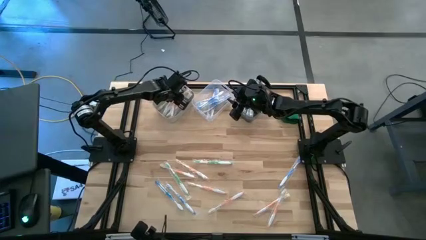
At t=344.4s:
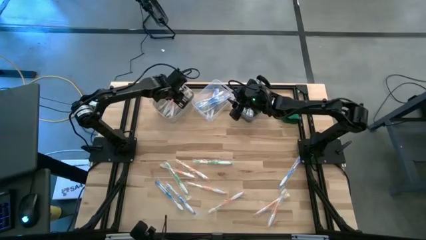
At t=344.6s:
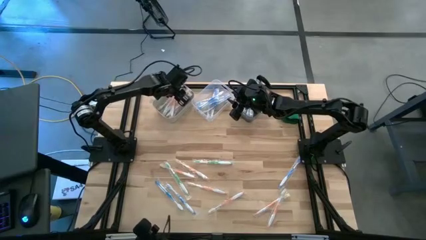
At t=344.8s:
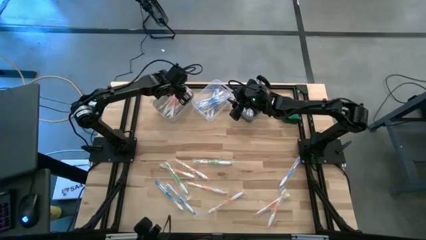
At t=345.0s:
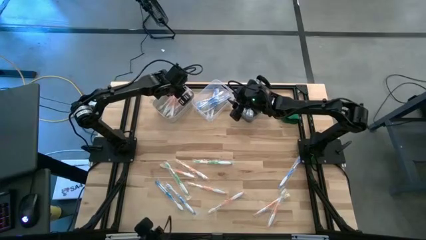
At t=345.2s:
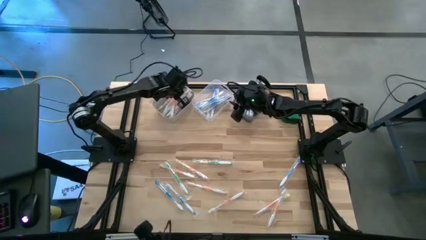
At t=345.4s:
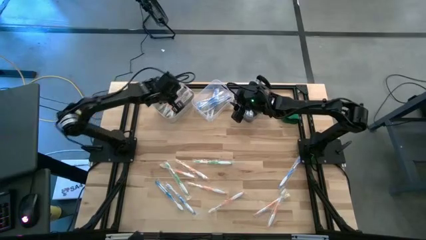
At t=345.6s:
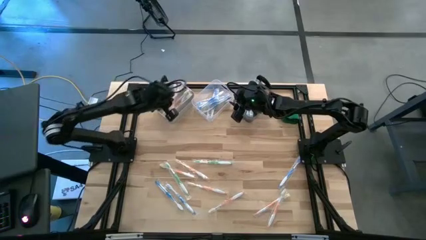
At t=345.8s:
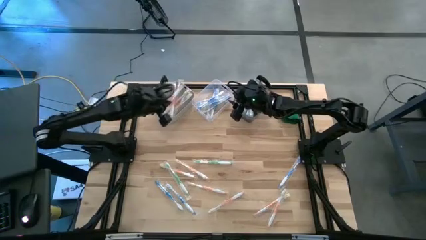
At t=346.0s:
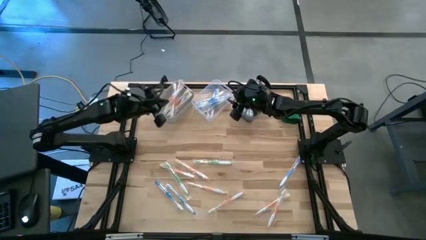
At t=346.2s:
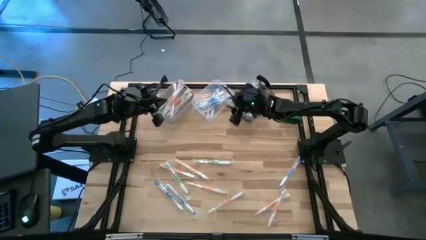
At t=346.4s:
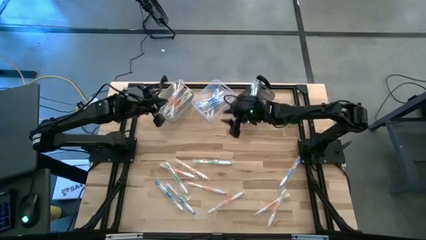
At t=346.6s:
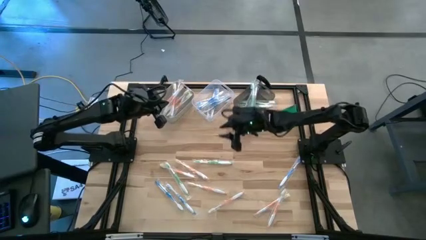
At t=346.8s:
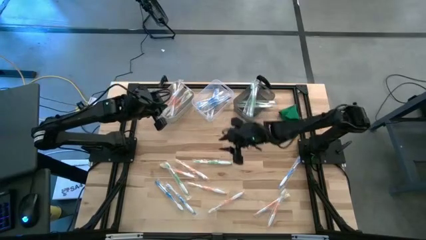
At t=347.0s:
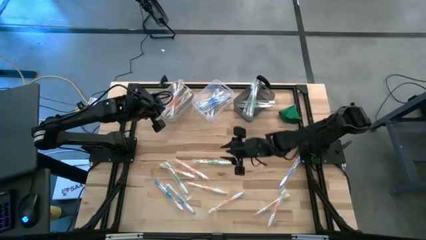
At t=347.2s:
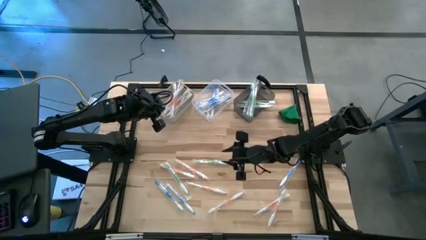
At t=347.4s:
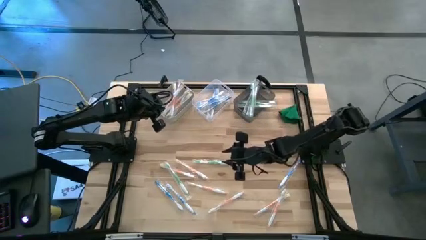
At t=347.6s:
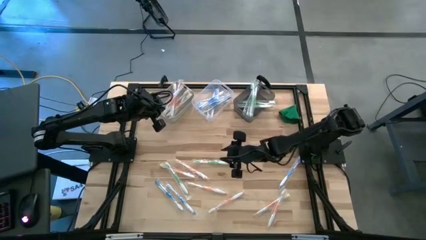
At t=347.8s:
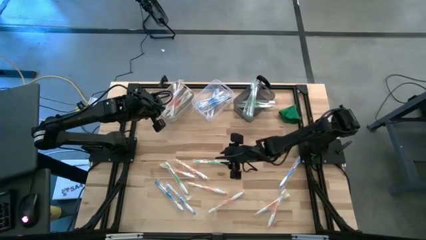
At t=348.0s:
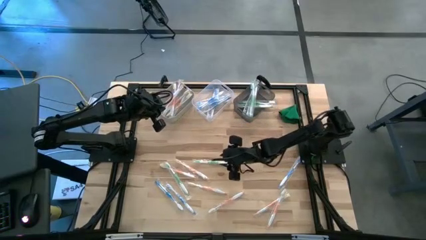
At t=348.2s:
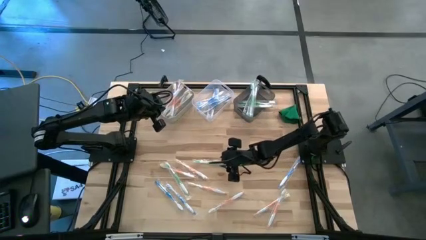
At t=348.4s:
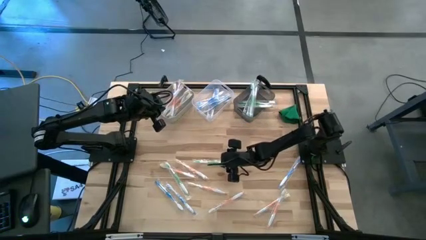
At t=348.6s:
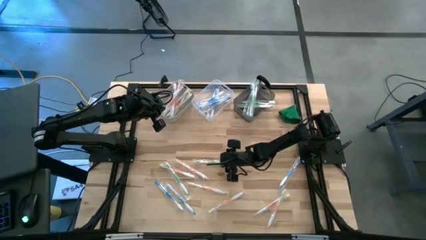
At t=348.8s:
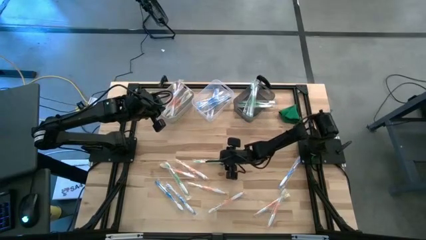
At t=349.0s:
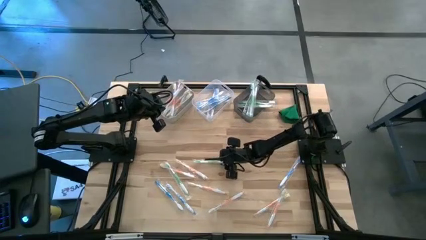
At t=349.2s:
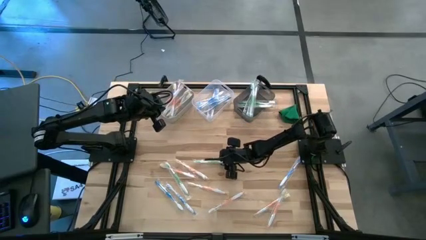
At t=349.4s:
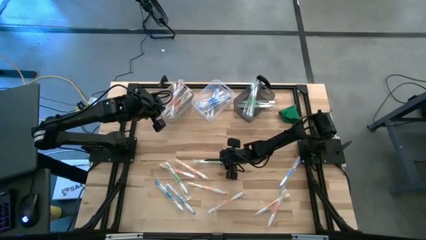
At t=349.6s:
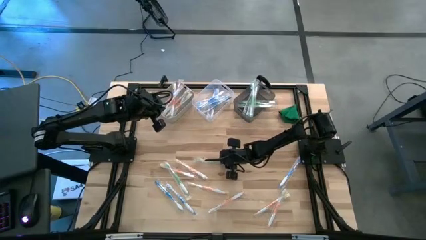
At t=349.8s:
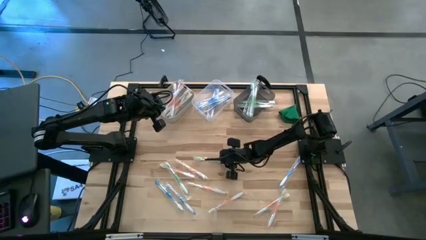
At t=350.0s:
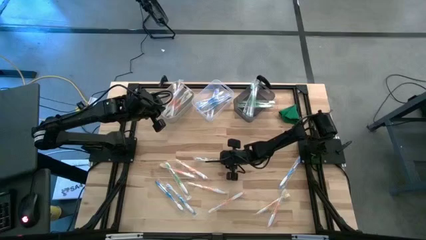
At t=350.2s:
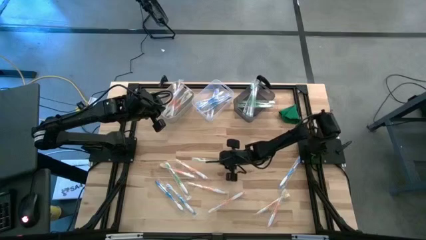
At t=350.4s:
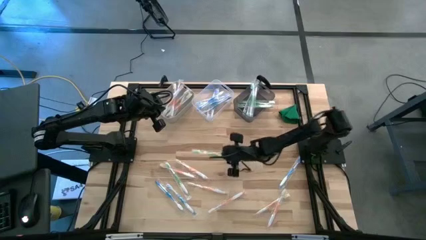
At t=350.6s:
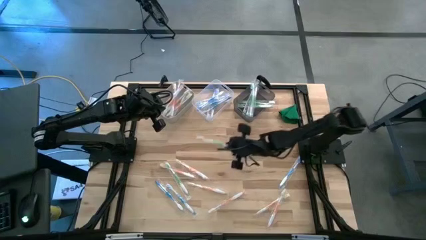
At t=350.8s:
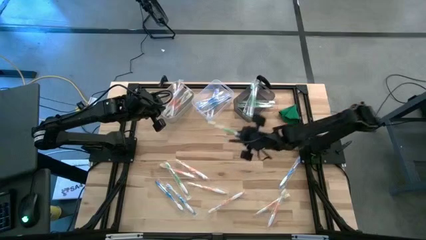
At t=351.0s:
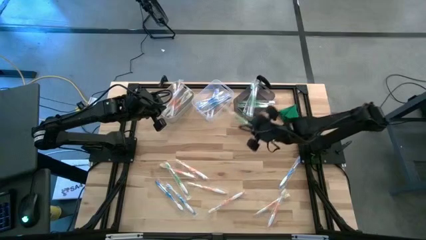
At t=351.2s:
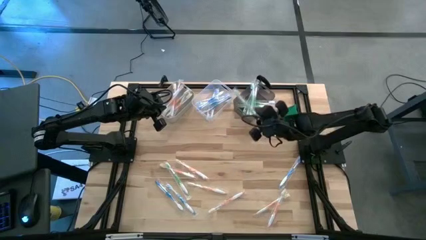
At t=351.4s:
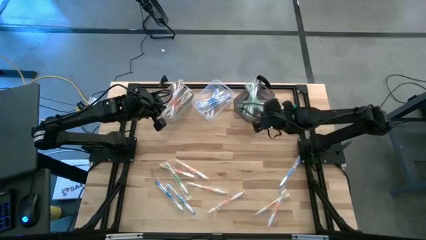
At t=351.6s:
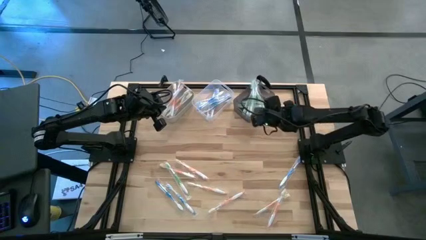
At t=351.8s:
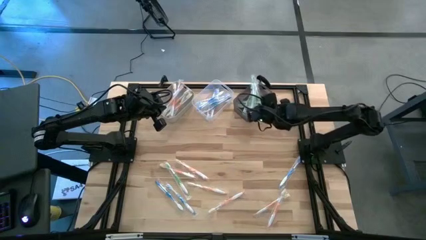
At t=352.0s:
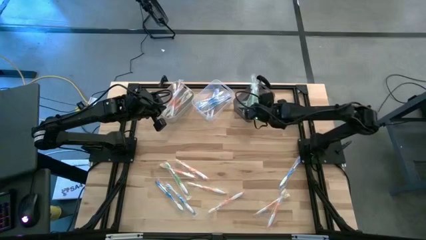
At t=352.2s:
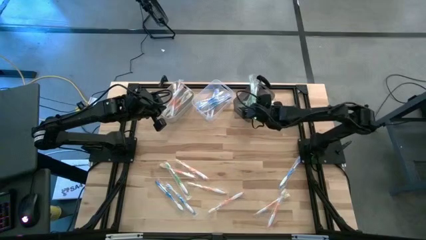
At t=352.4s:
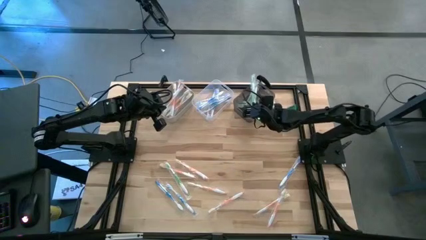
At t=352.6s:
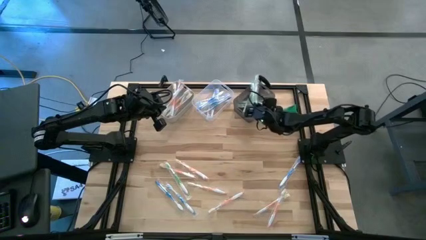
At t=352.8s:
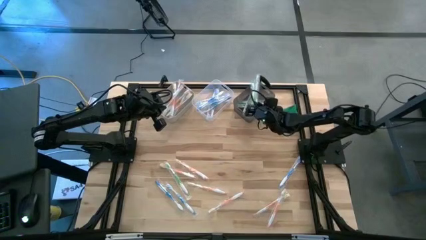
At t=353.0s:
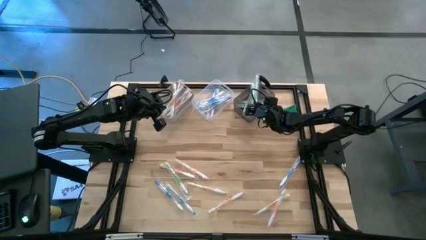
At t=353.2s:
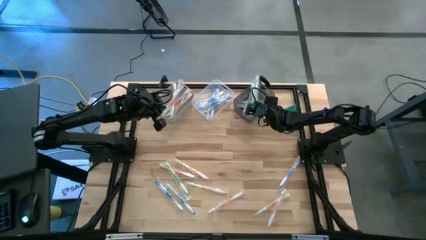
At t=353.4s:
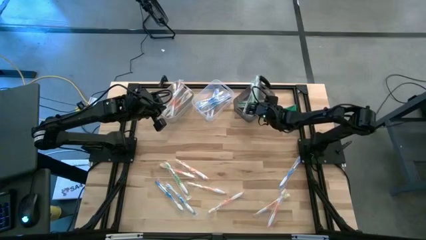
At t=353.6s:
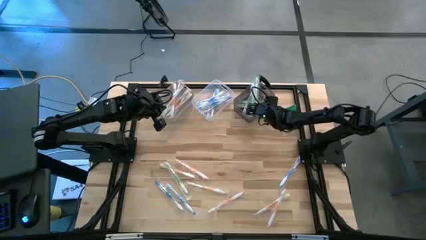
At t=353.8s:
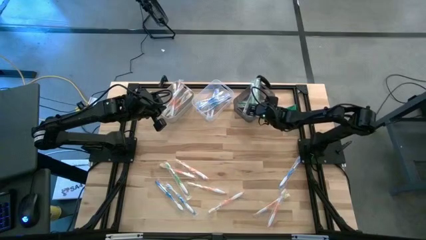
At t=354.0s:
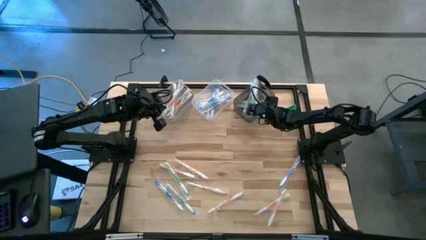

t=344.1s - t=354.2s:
Task: Pick & Place Toothbrushes
Put the green toothbrush into the black bin

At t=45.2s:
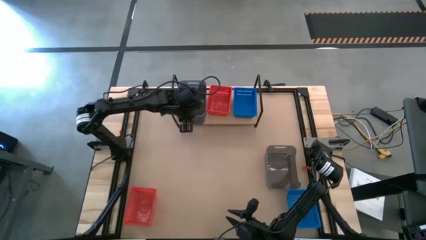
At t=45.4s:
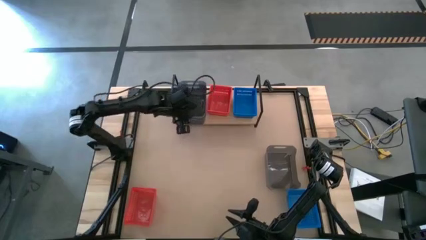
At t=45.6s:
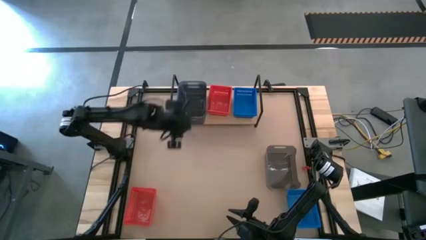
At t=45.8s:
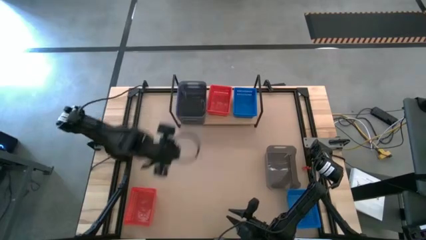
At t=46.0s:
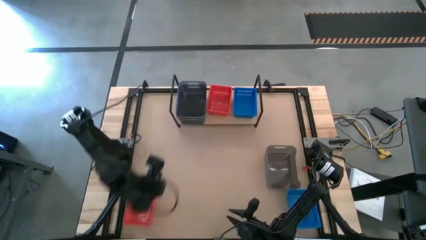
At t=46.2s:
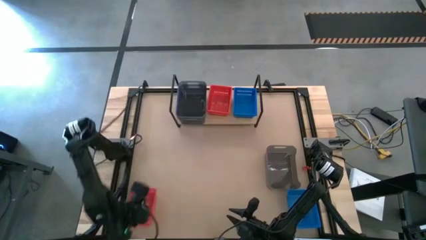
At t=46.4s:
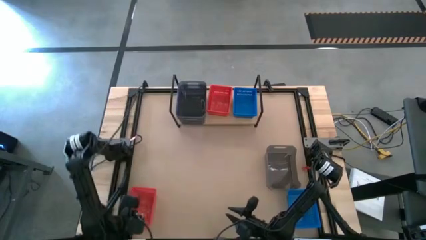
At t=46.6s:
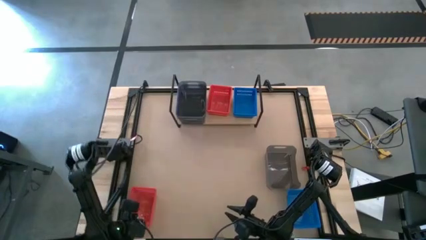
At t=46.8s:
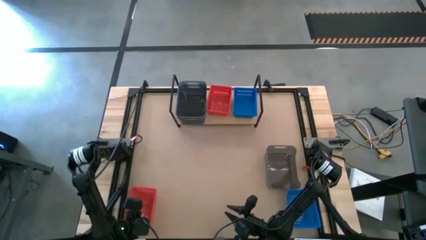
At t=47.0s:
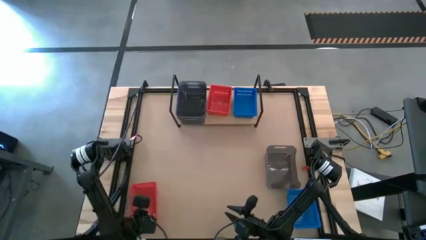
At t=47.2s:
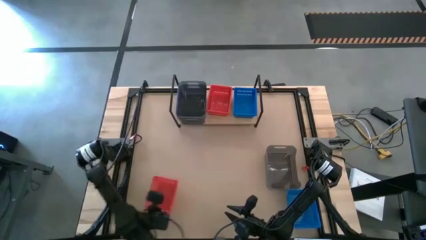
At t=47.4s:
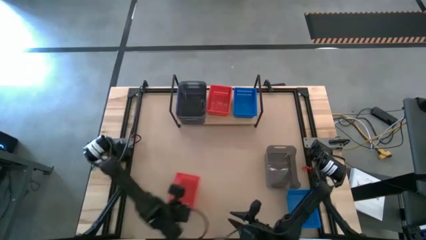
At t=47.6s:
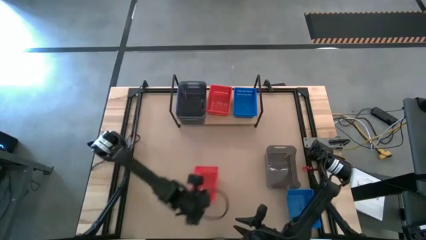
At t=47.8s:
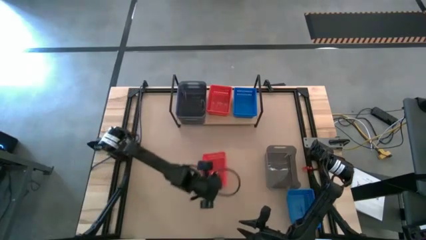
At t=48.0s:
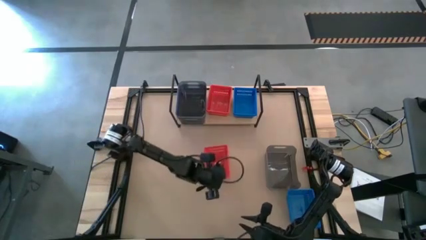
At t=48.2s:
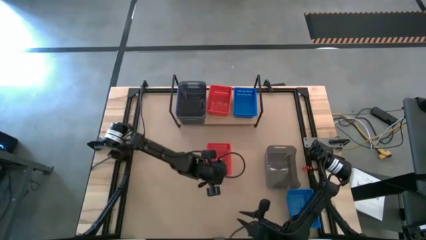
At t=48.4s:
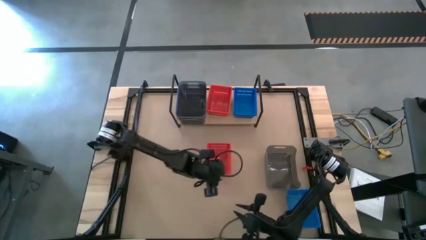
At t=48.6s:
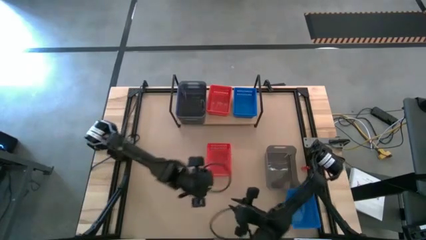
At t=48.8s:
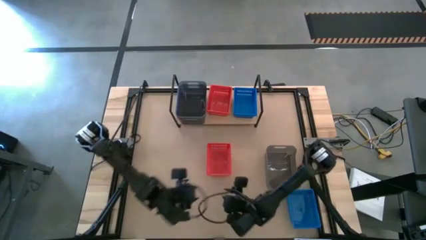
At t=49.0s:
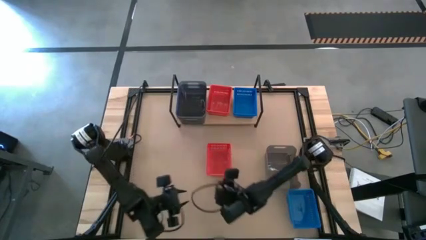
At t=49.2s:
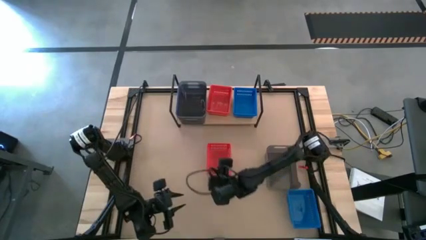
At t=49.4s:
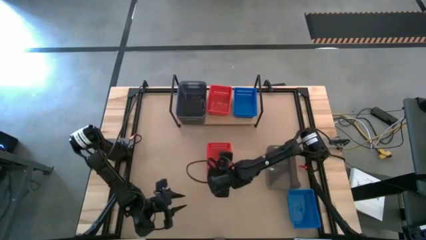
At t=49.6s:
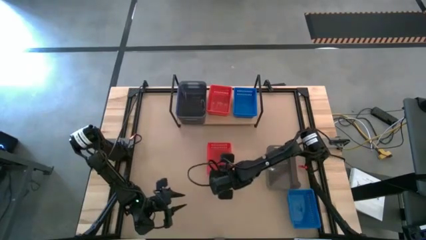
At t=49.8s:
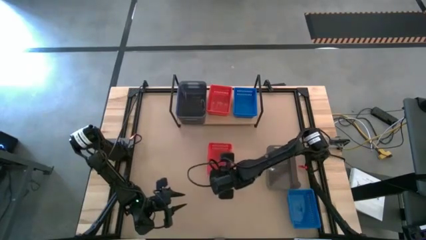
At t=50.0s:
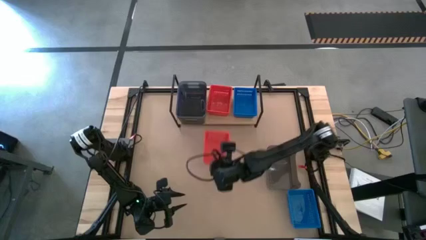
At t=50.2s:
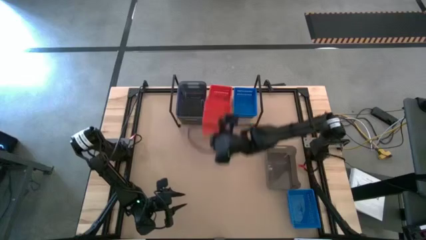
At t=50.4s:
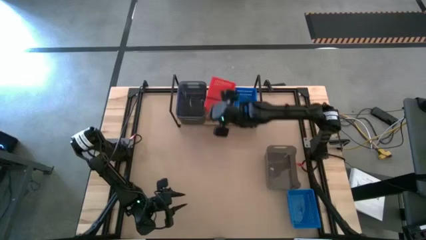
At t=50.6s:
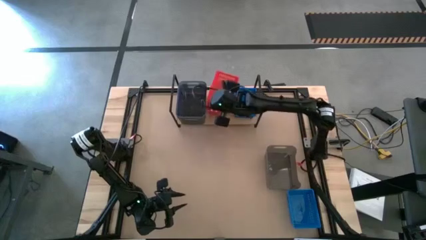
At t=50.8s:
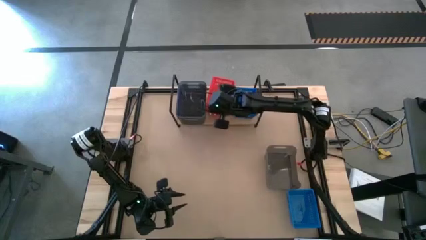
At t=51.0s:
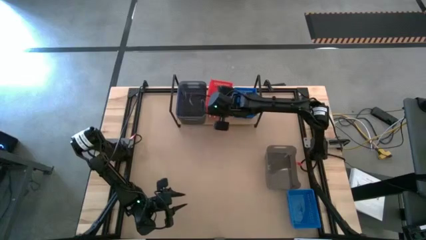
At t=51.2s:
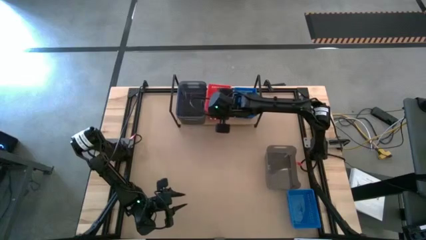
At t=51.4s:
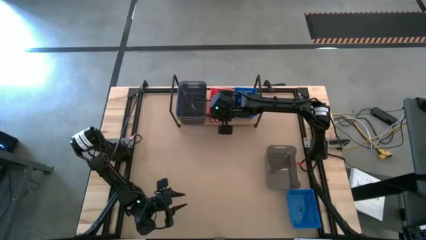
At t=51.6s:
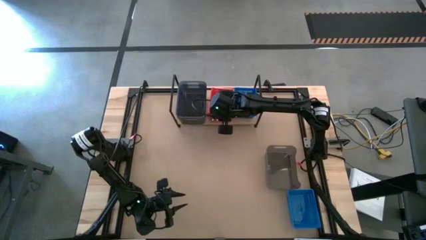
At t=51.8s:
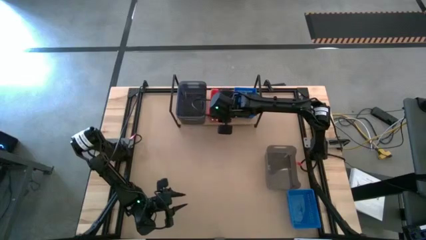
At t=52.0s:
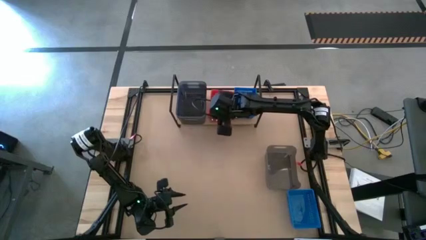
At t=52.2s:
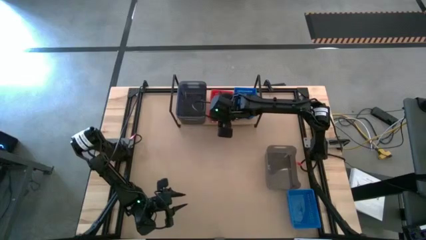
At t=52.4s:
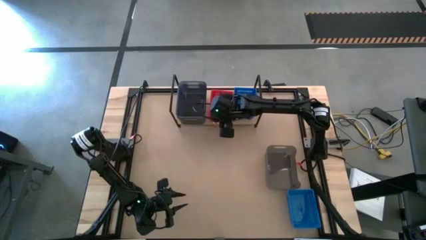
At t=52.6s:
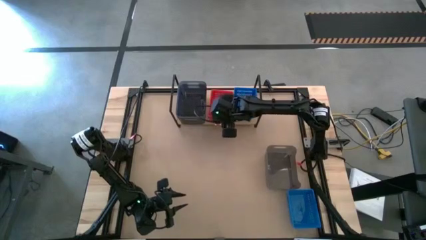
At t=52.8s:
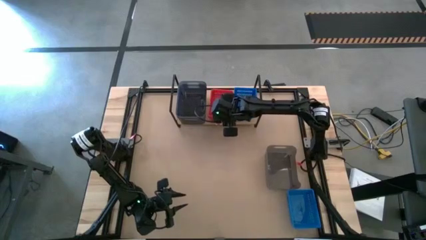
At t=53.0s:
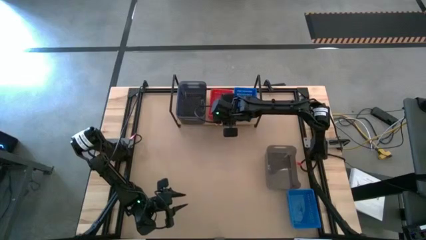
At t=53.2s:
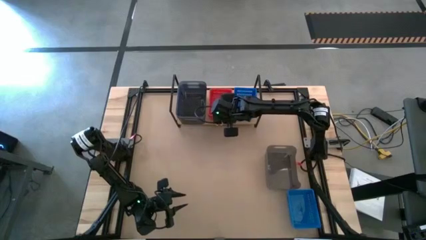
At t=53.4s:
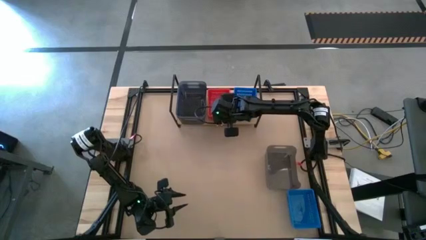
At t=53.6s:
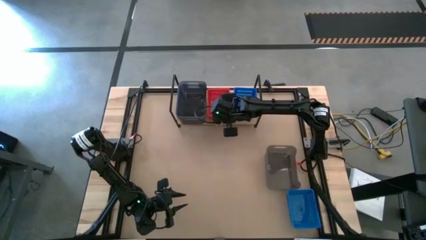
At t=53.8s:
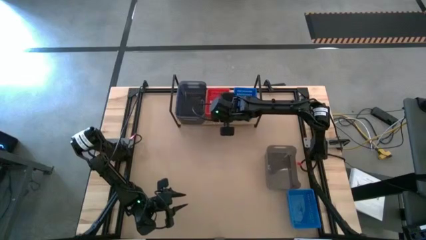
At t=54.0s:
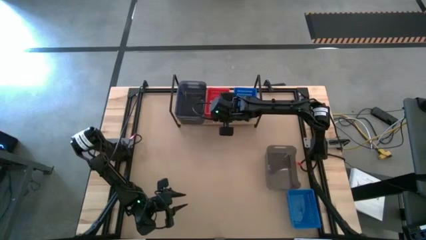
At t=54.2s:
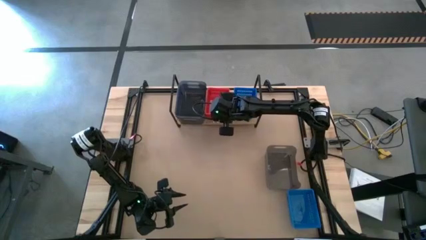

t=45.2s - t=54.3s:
Task: Stack baskets on shelf by color
Stack the red bin on the other red bins on the shelf
